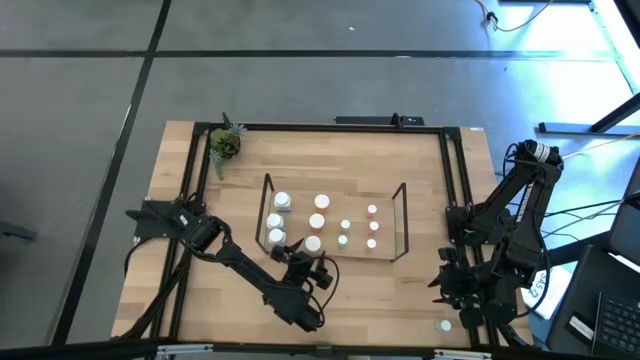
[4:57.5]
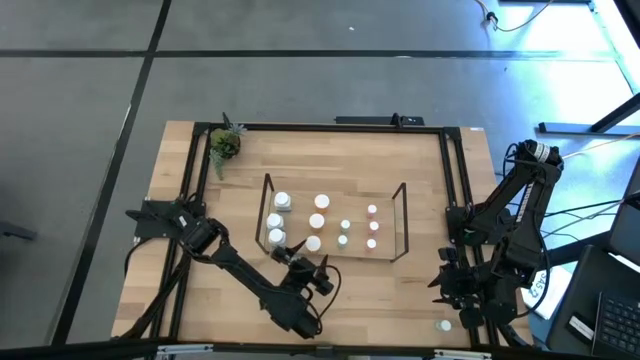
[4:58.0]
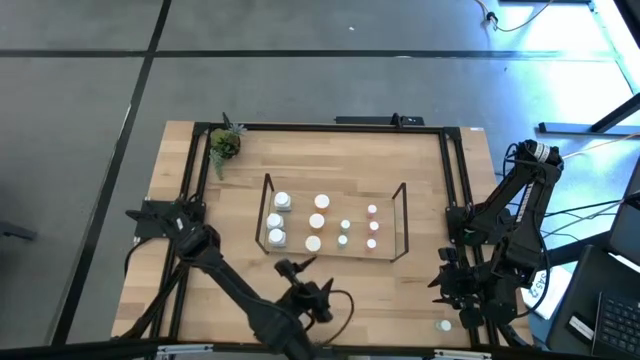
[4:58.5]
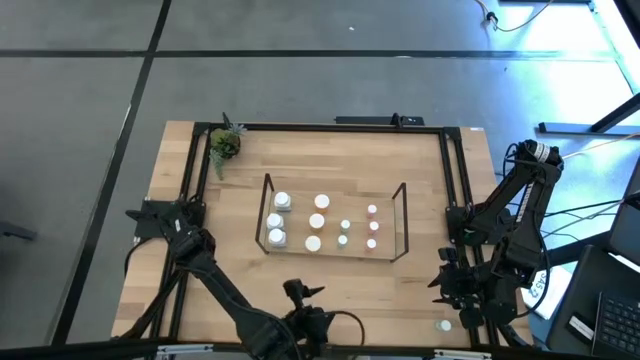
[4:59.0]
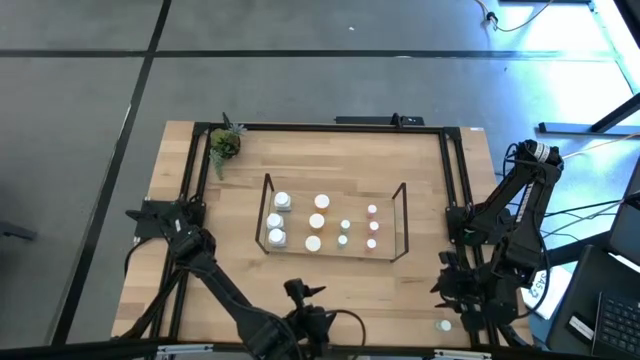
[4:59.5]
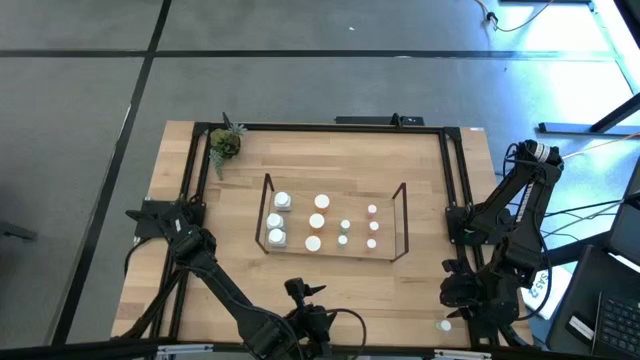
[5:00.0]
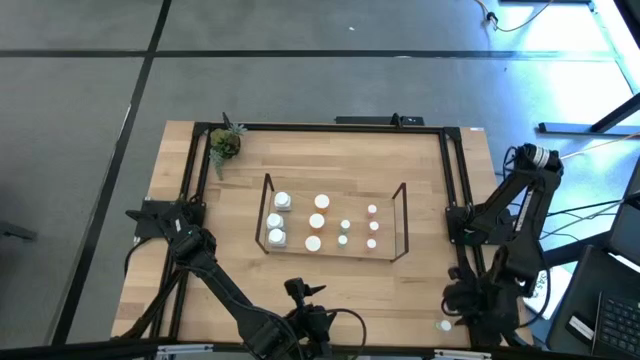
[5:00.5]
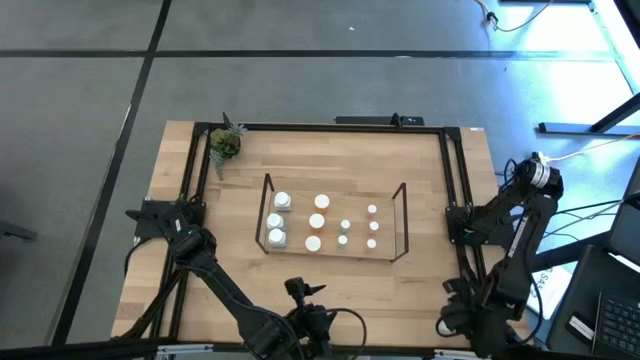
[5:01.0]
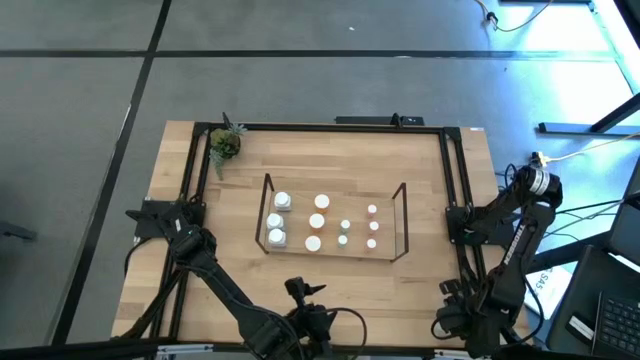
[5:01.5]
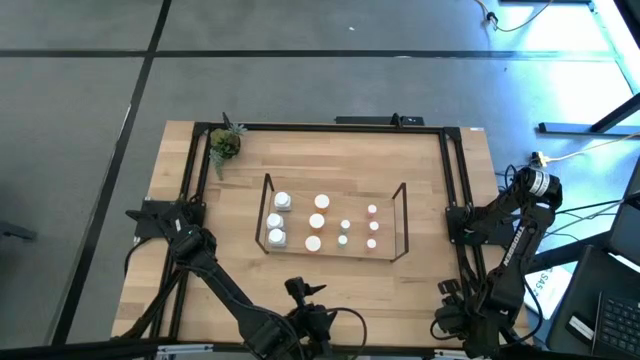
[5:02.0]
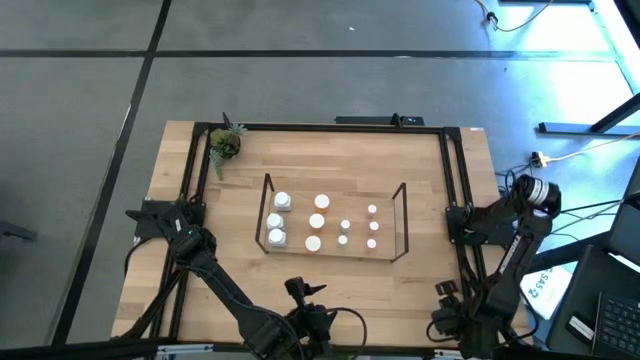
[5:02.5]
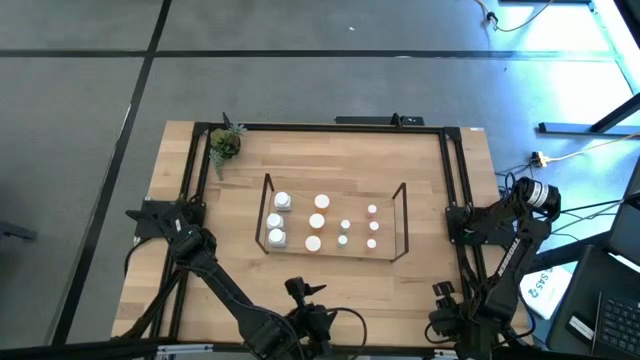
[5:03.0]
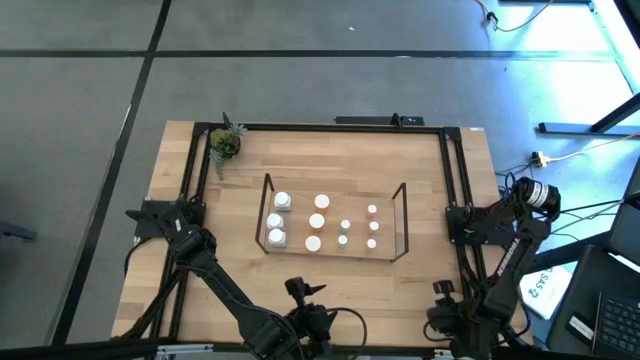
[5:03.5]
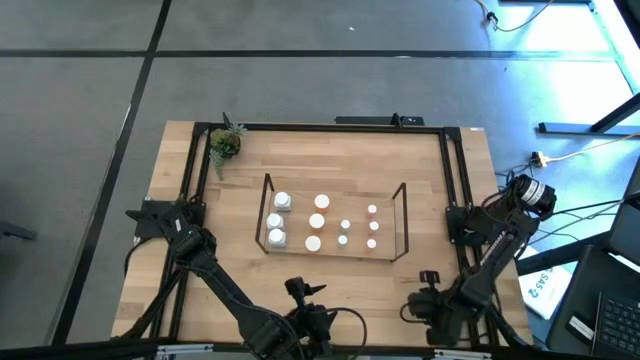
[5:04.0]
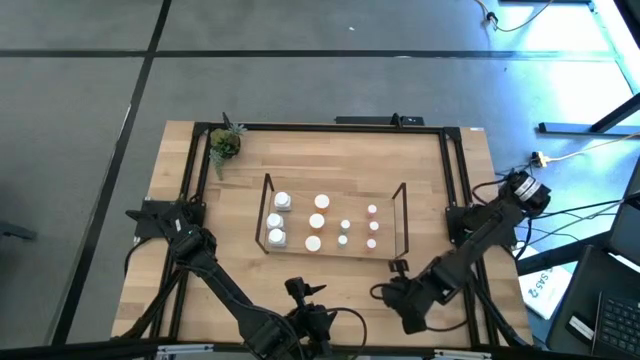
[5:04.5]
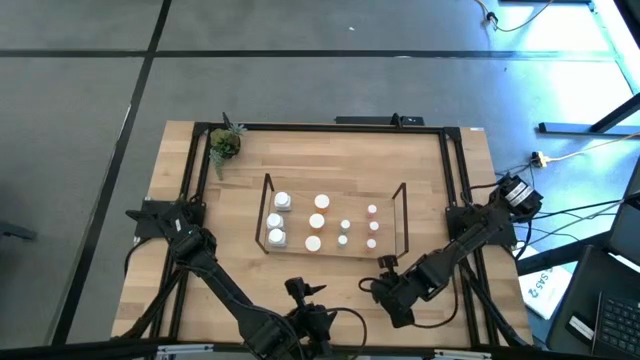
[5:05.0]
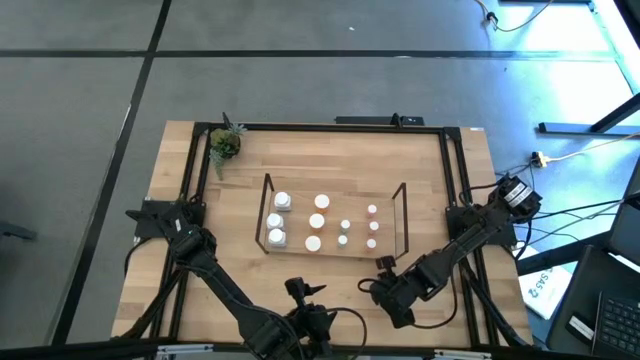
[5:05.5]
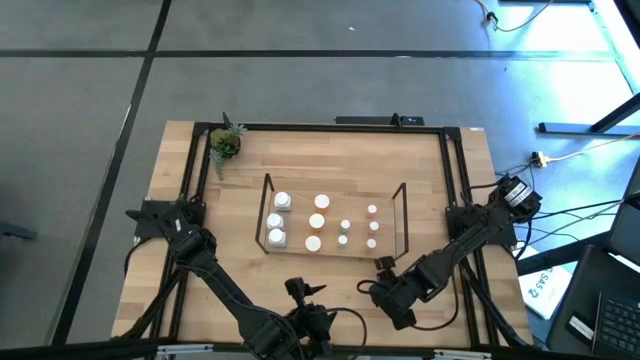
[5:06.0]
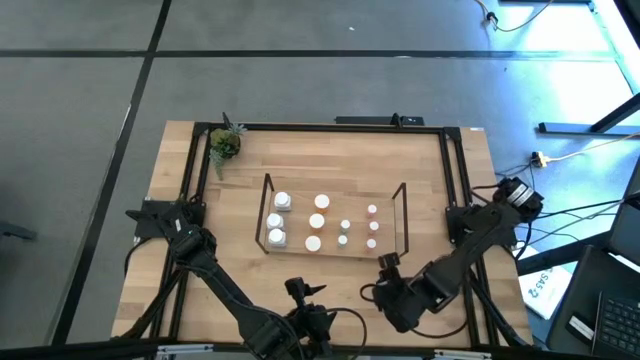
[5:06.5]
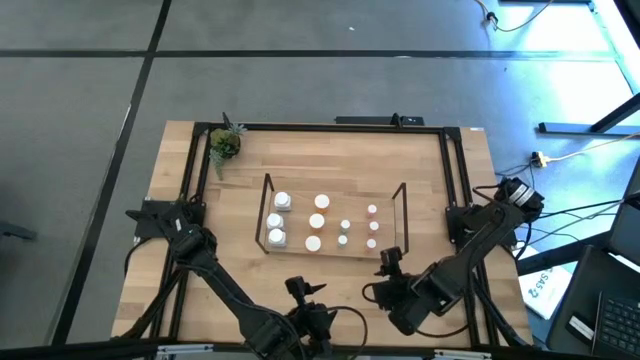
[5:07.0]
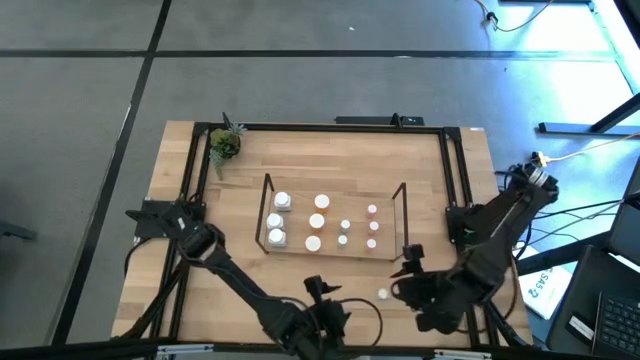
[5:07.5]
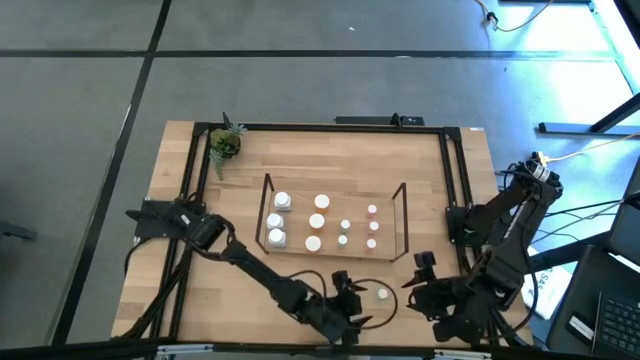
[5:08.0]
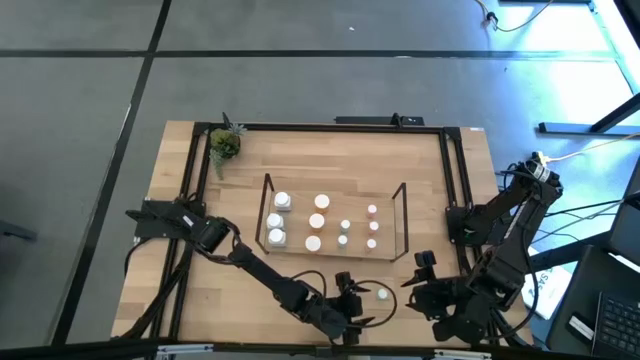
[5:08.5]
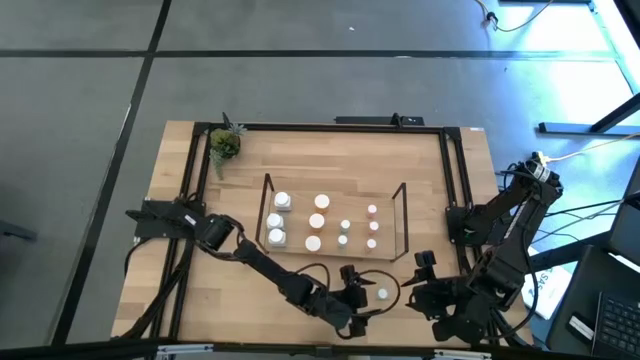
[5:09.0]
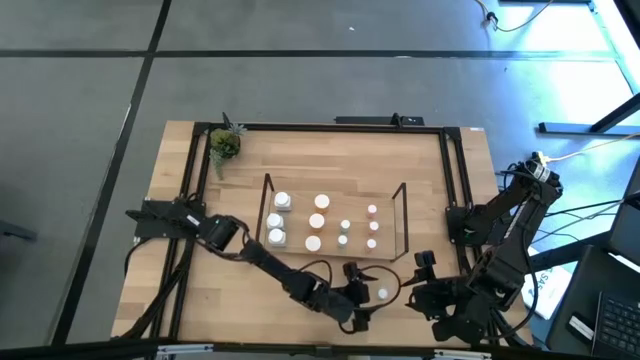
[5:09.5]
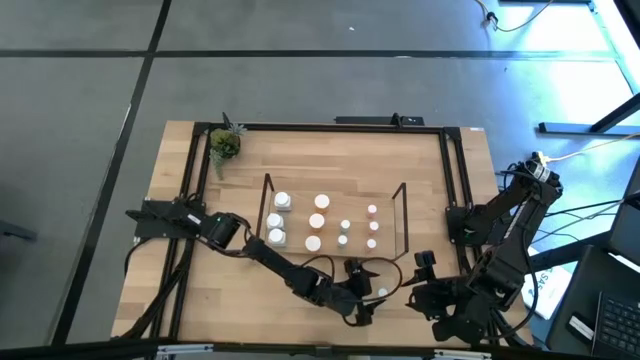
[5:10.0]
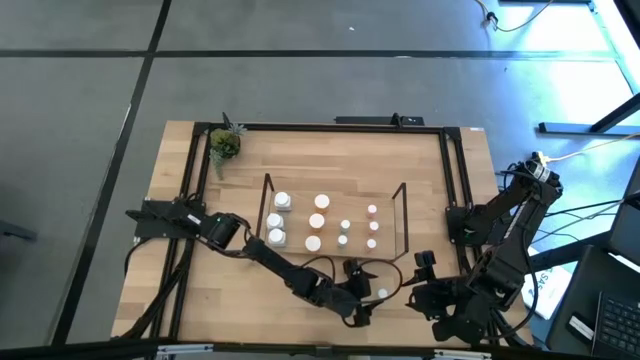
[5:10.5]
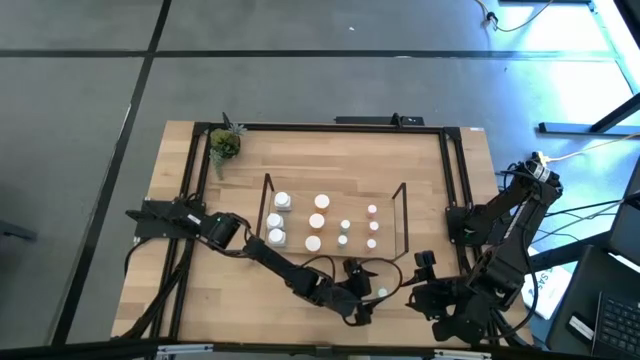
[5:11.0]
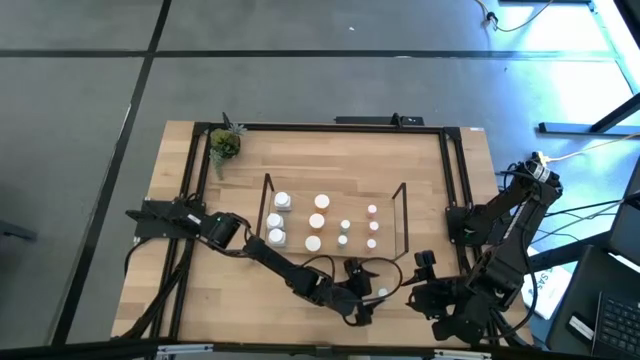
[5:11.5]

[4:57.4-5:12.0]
Task: Pick and place medicine bottles onto shelf by color
Put the light blue pill bottle on the shelf aligned with the other light blue pill bottle

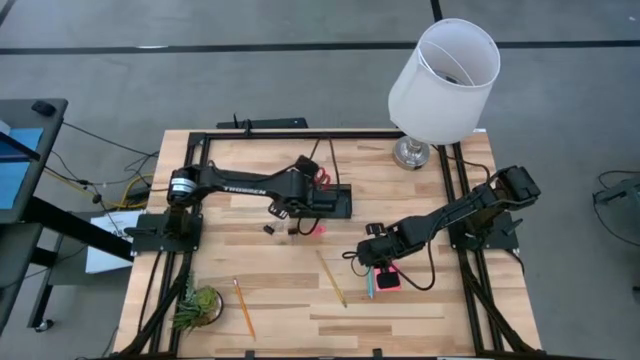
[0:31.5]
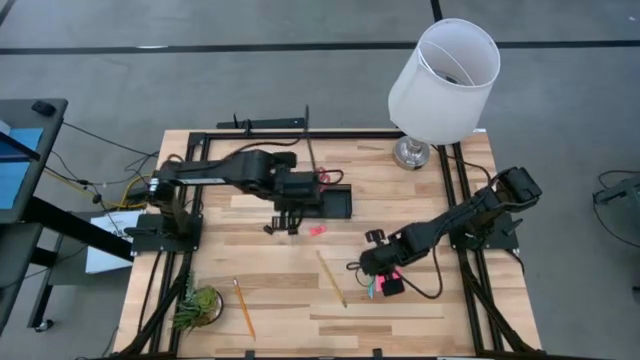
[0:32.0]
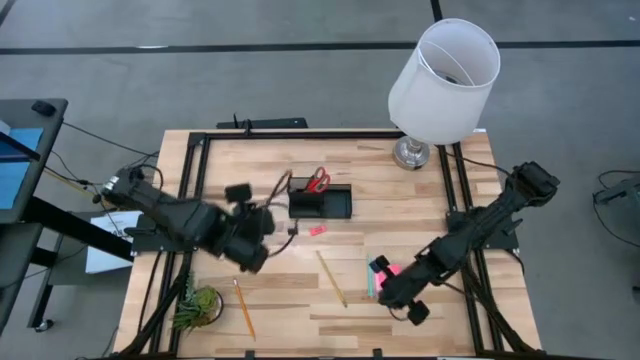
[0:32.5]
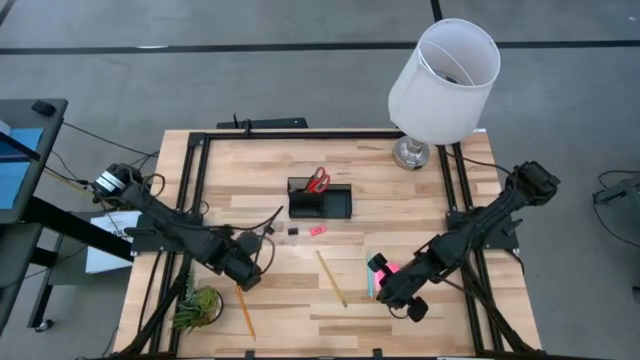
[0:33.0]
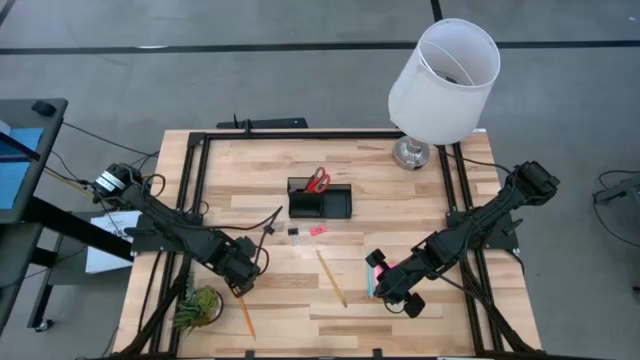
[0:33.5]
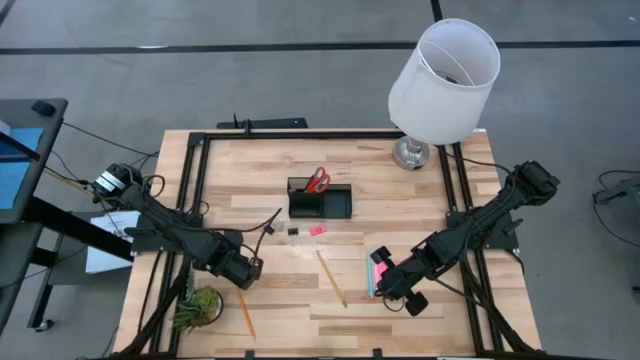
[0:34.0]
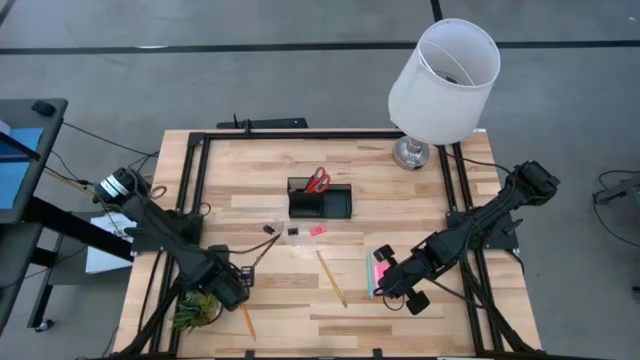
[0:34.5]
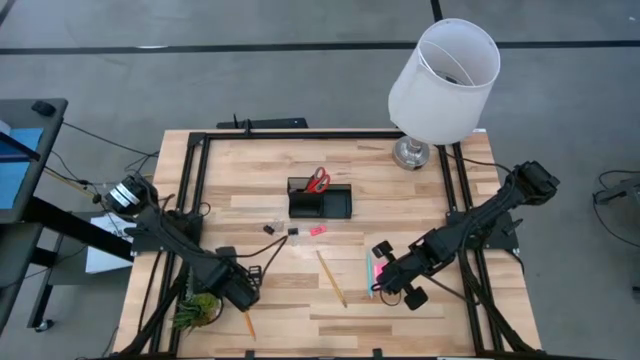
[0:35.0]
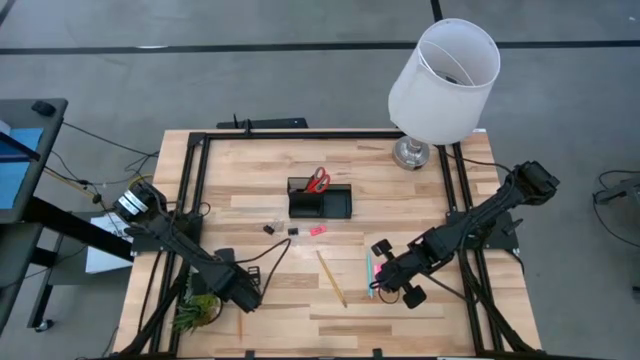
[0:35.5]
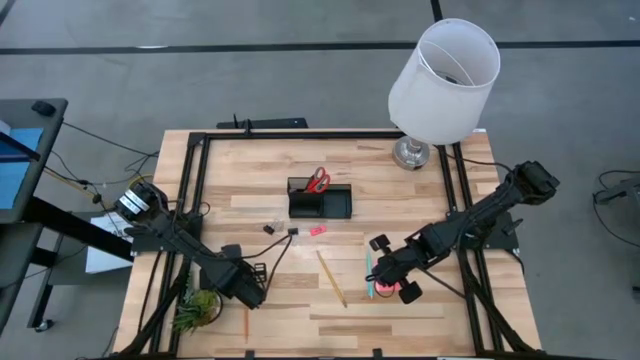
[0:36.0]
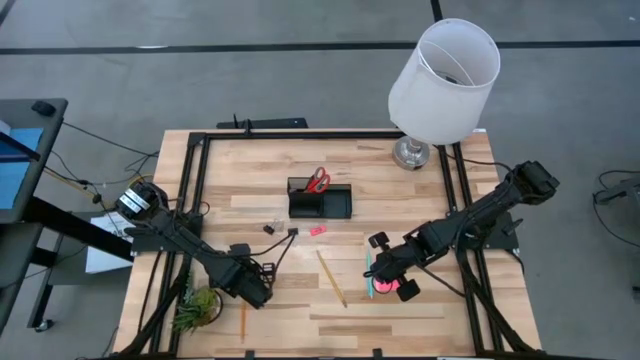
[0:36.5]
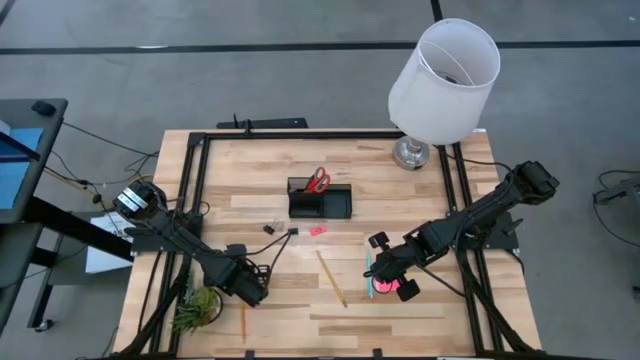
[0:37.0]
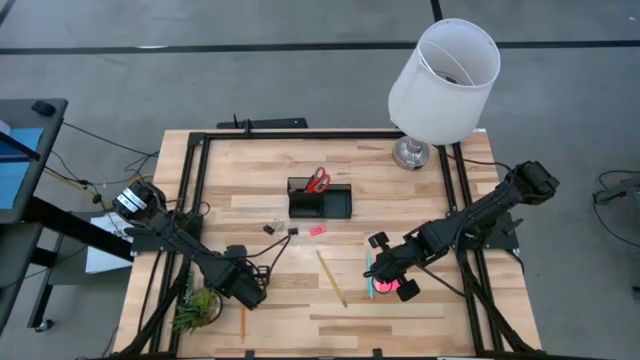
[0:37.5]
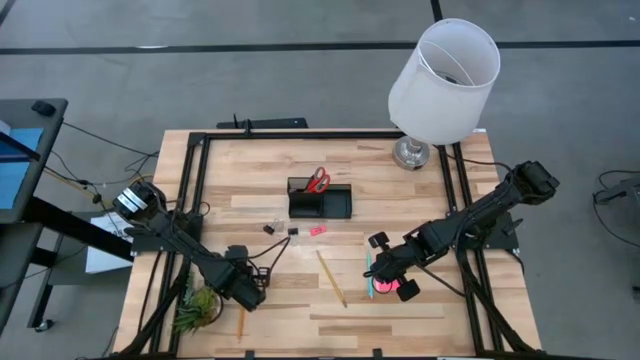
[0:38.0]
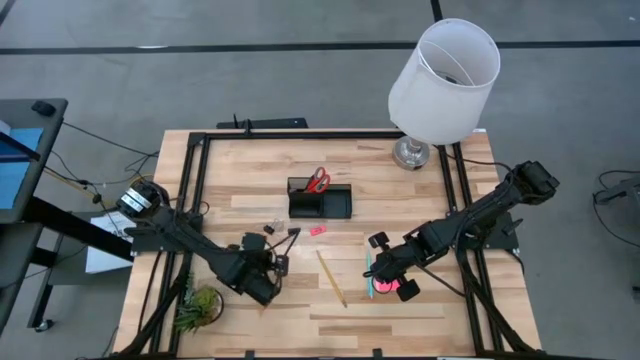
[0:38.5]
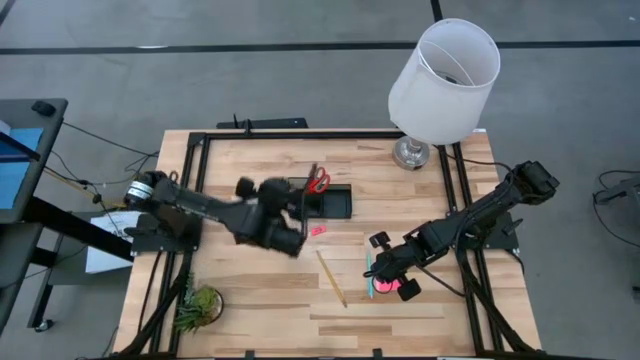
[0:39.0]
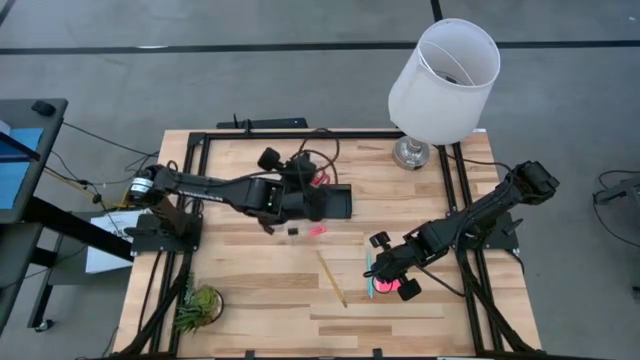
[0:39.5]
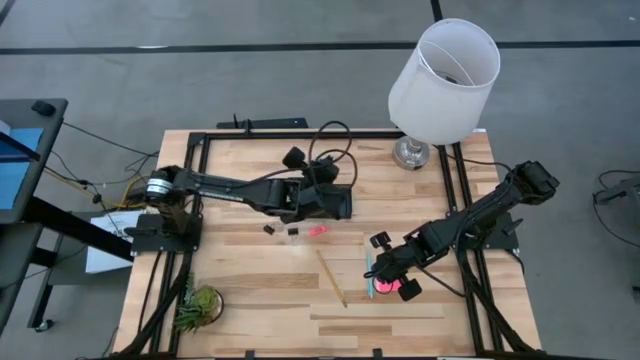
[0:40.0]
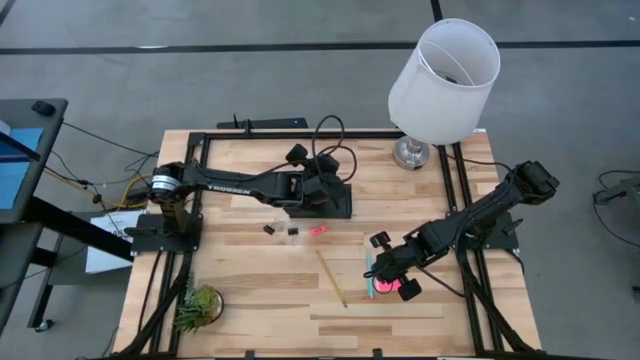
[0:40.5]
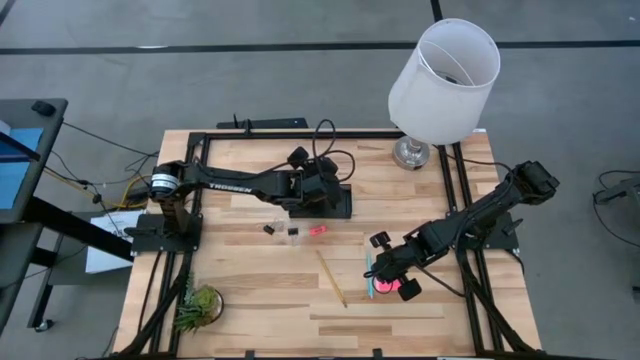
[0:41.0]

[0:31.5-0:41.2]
Task: Pick and place office supplies into organizer
Put the yellow pencil into the top left compartment of the black desk organizer
